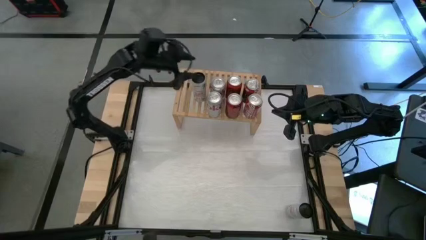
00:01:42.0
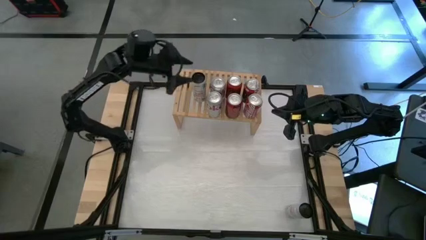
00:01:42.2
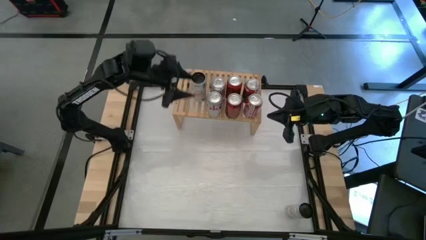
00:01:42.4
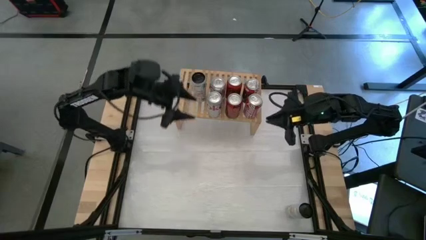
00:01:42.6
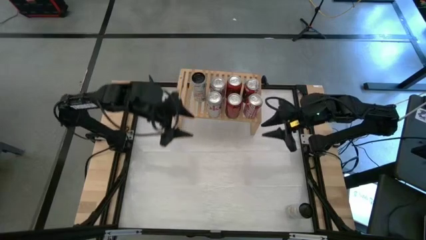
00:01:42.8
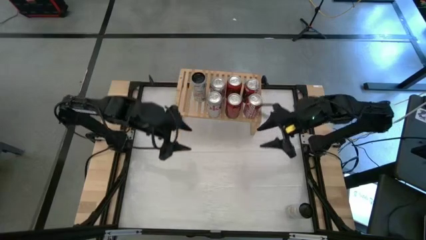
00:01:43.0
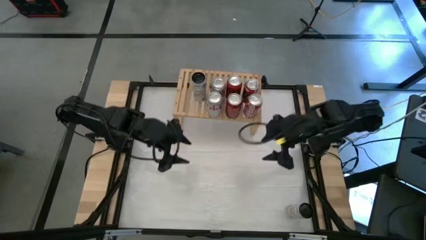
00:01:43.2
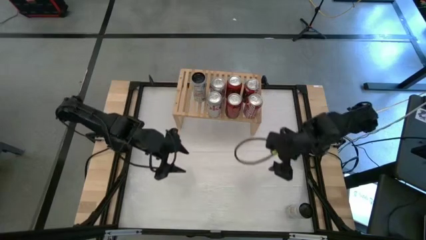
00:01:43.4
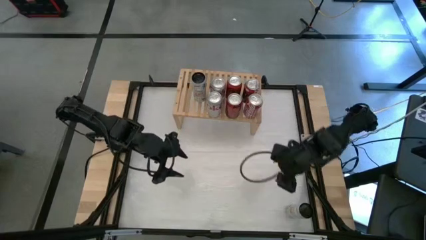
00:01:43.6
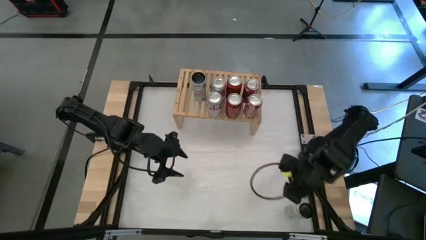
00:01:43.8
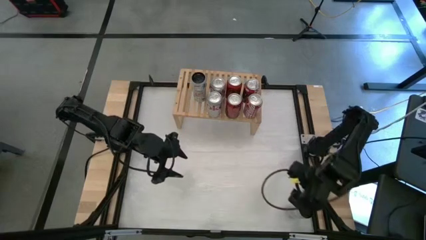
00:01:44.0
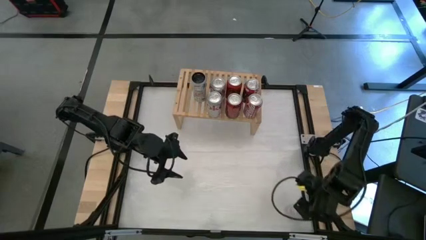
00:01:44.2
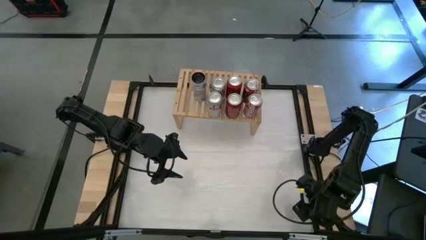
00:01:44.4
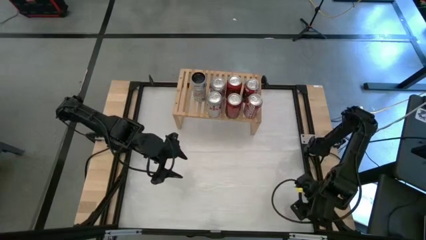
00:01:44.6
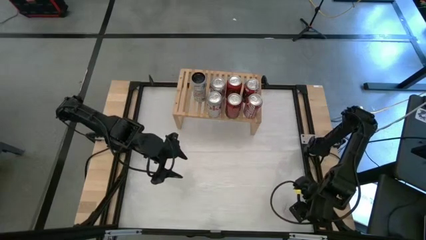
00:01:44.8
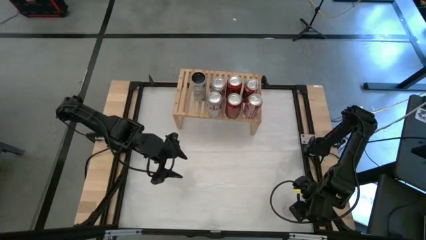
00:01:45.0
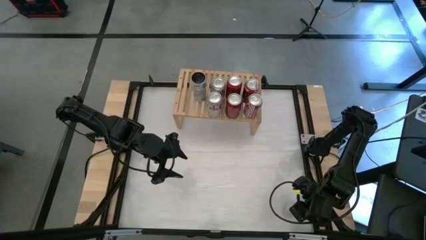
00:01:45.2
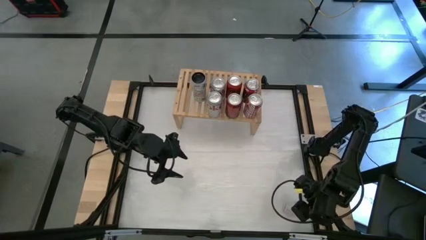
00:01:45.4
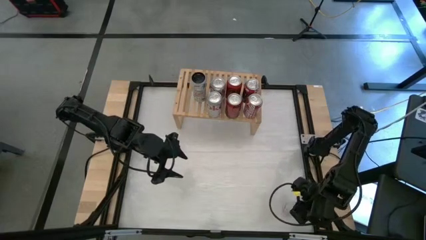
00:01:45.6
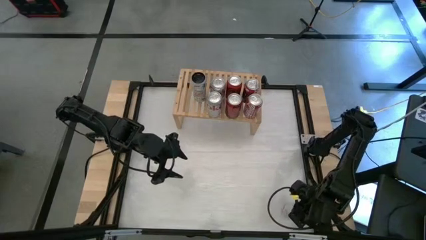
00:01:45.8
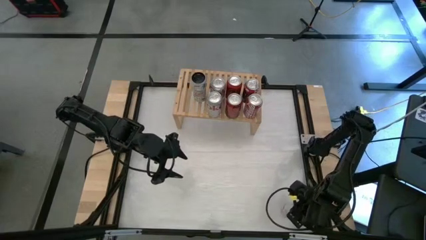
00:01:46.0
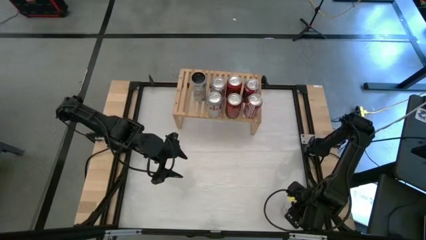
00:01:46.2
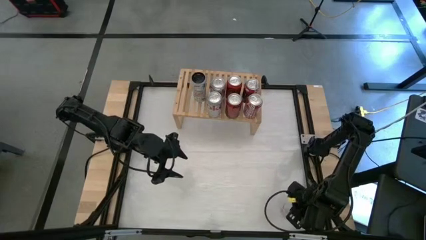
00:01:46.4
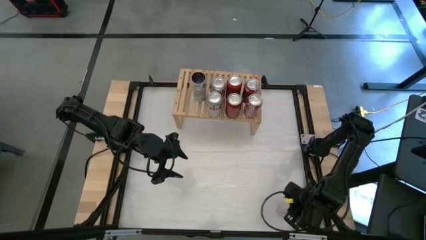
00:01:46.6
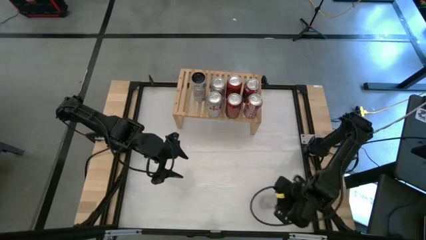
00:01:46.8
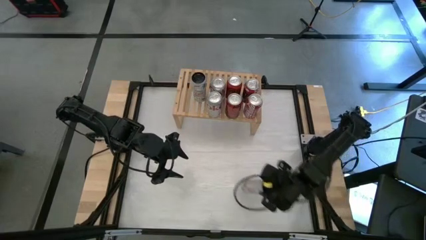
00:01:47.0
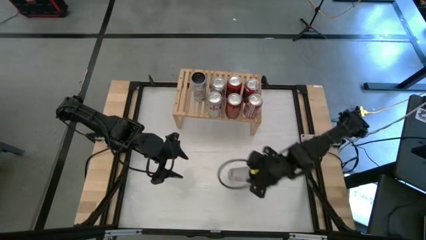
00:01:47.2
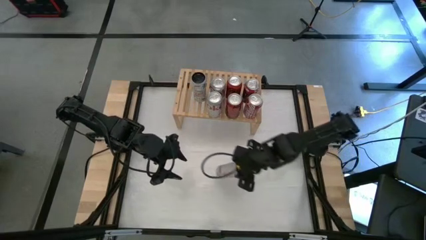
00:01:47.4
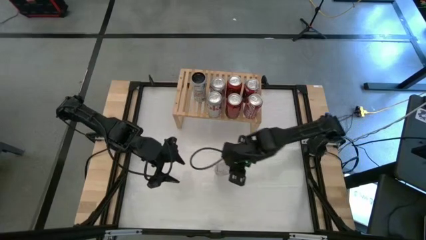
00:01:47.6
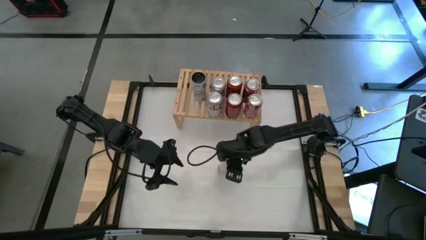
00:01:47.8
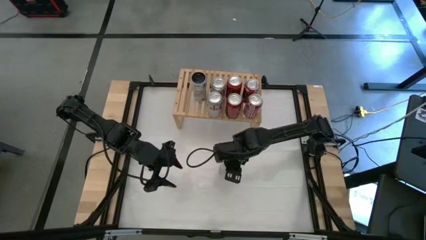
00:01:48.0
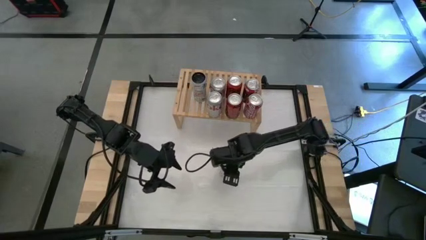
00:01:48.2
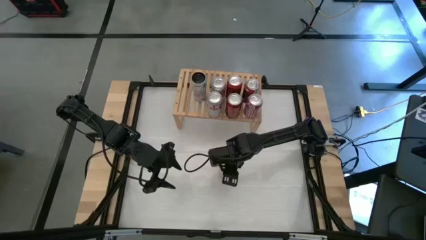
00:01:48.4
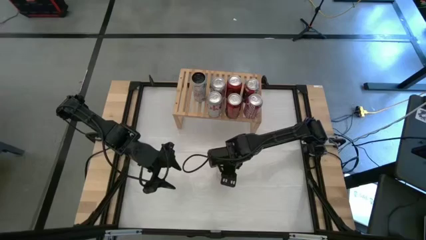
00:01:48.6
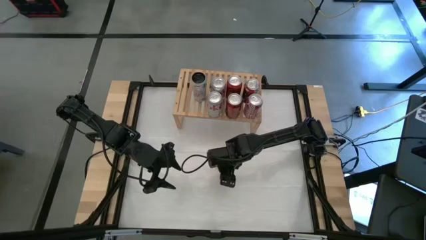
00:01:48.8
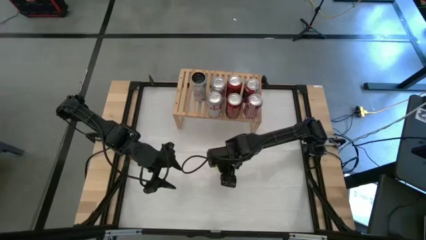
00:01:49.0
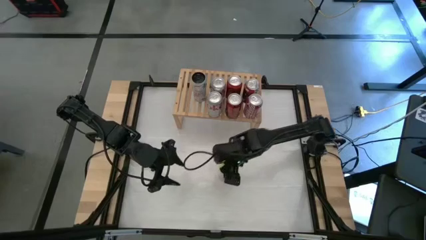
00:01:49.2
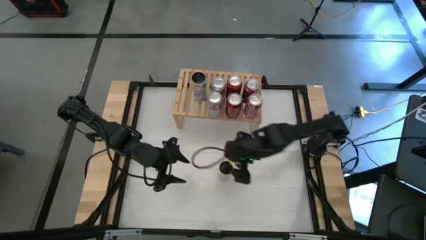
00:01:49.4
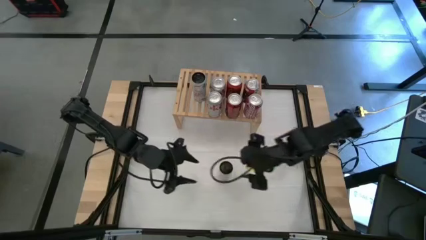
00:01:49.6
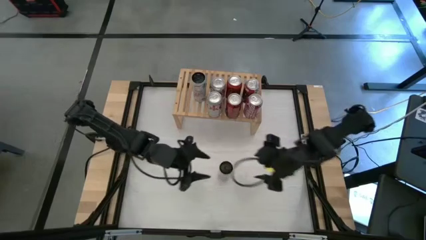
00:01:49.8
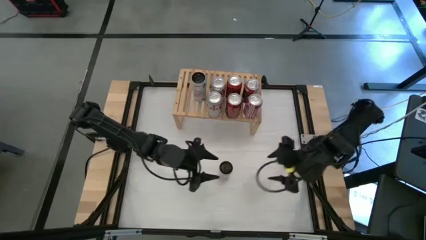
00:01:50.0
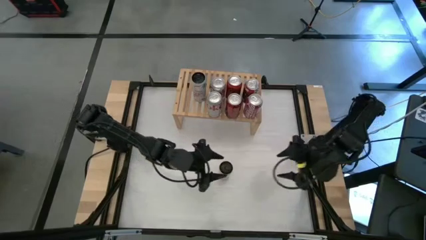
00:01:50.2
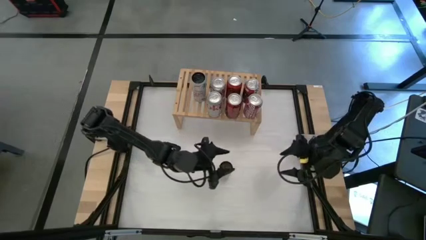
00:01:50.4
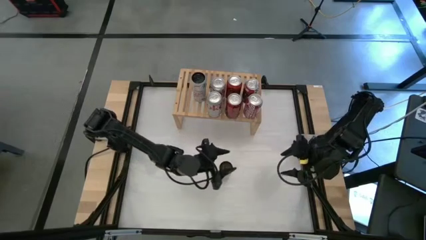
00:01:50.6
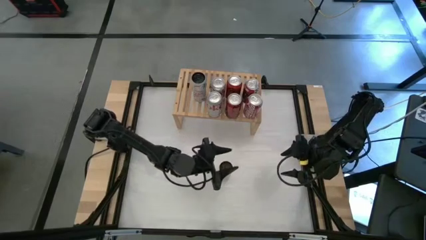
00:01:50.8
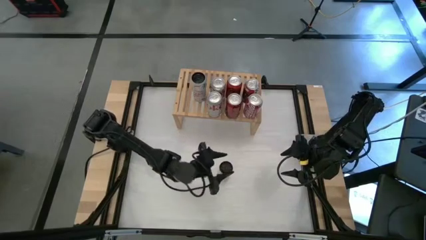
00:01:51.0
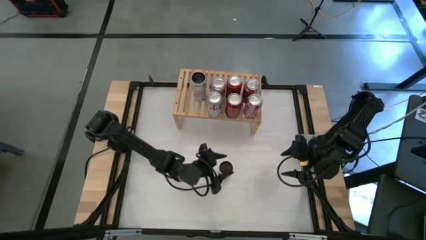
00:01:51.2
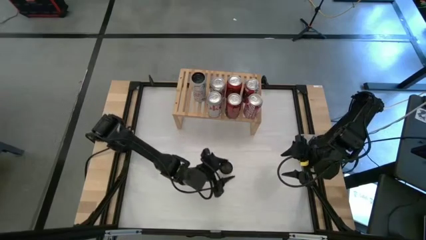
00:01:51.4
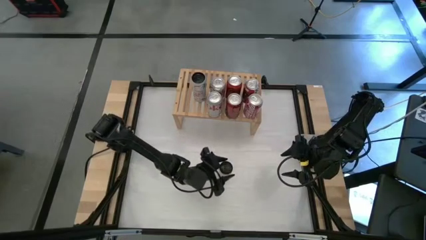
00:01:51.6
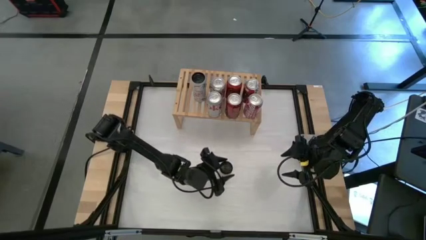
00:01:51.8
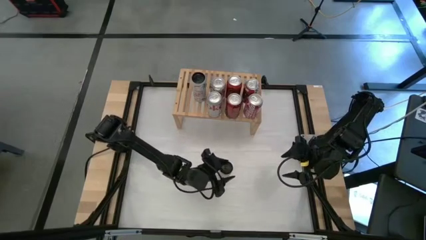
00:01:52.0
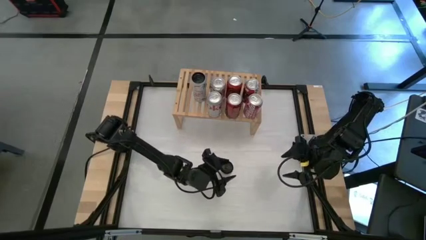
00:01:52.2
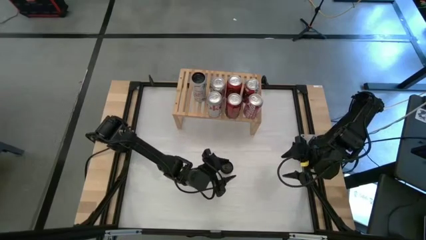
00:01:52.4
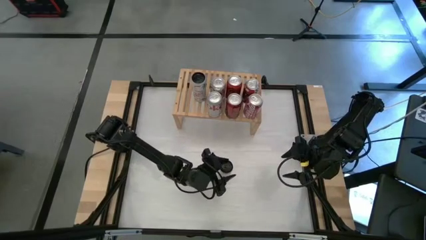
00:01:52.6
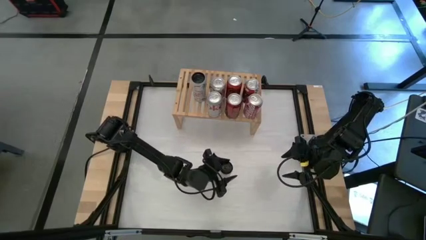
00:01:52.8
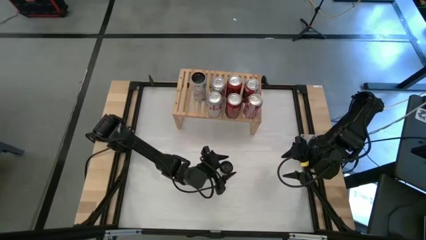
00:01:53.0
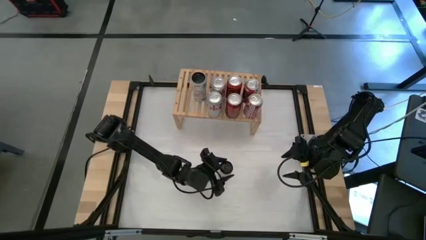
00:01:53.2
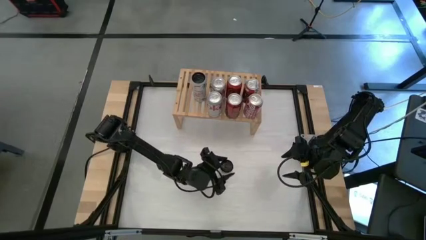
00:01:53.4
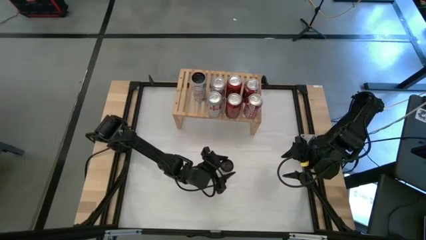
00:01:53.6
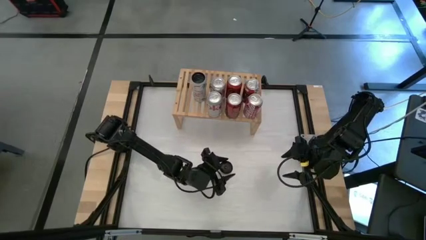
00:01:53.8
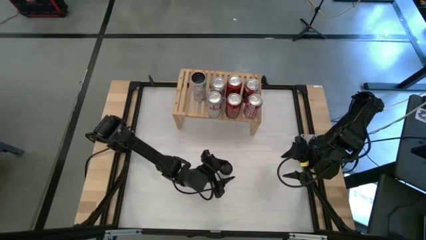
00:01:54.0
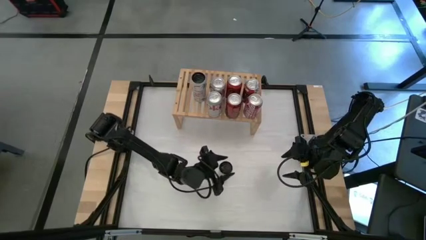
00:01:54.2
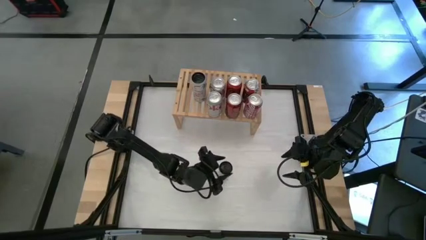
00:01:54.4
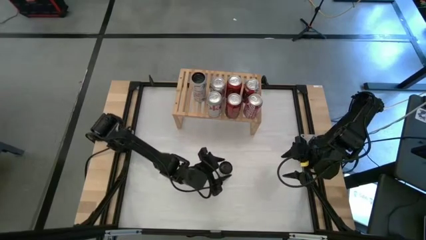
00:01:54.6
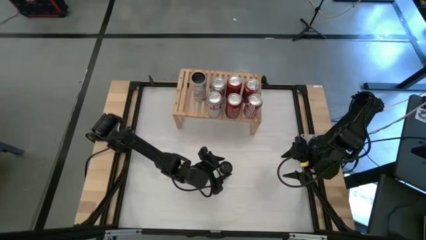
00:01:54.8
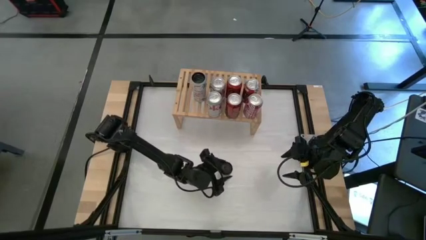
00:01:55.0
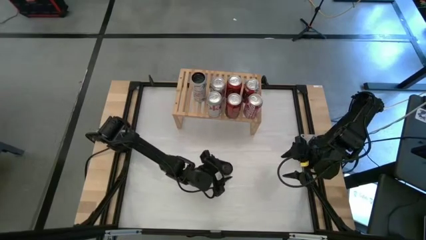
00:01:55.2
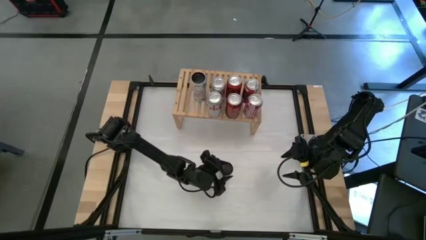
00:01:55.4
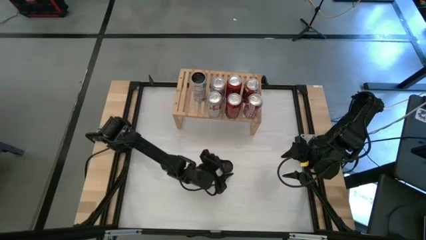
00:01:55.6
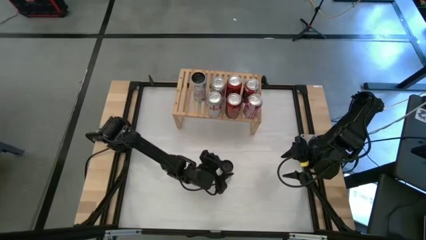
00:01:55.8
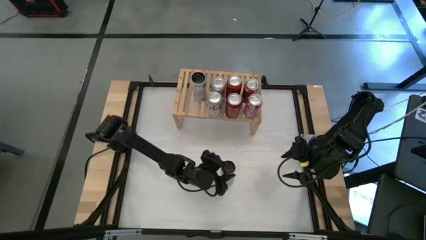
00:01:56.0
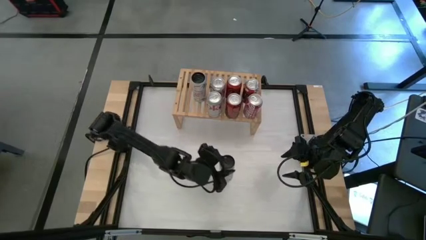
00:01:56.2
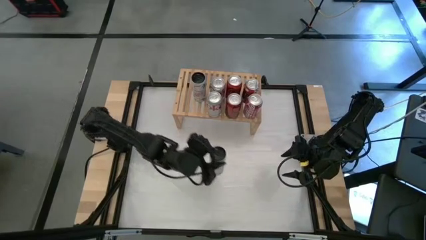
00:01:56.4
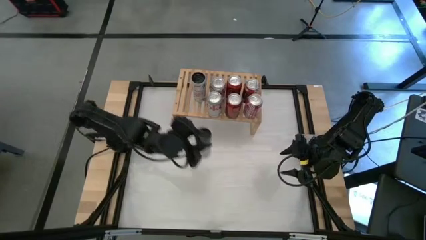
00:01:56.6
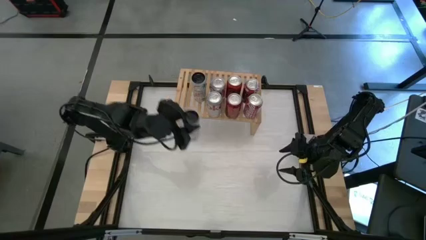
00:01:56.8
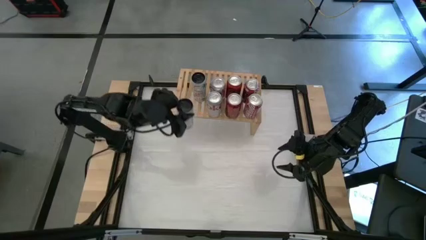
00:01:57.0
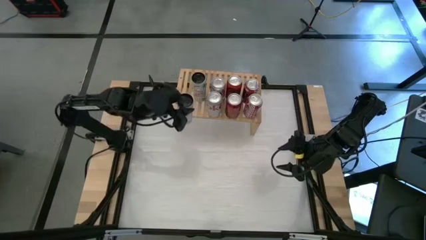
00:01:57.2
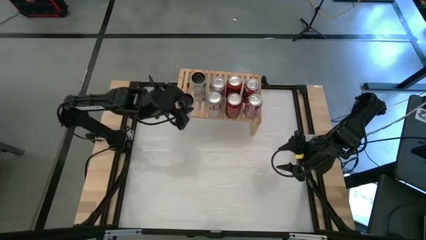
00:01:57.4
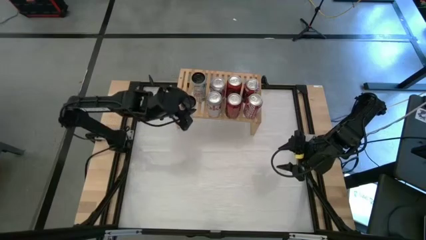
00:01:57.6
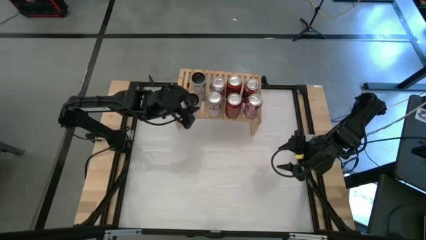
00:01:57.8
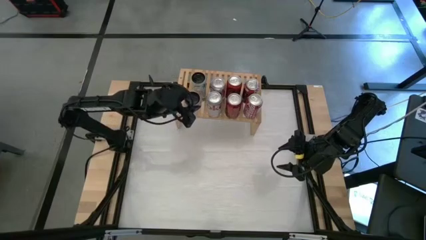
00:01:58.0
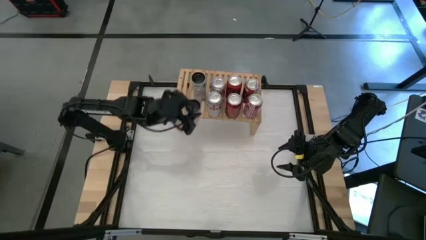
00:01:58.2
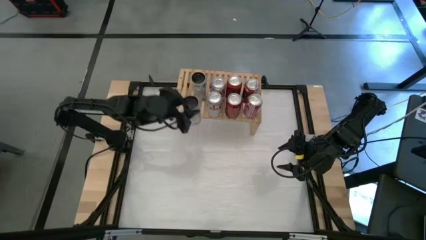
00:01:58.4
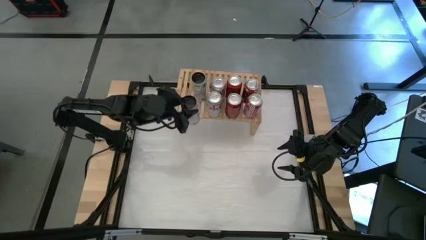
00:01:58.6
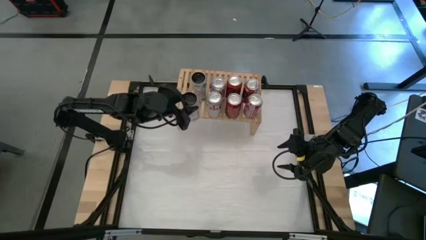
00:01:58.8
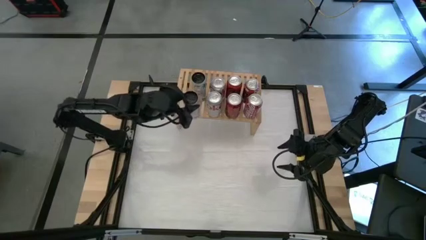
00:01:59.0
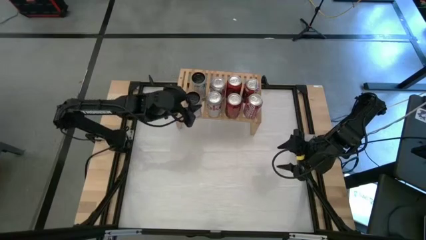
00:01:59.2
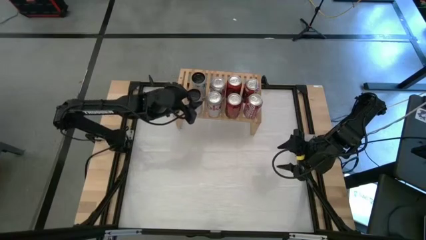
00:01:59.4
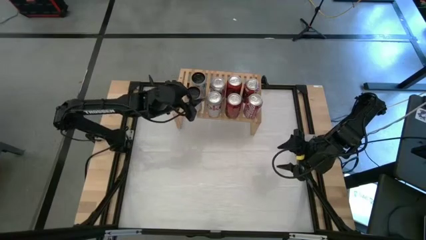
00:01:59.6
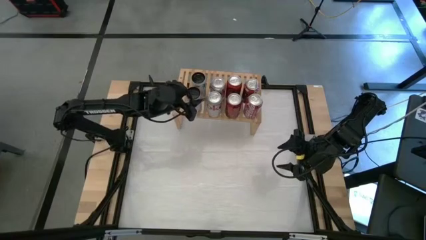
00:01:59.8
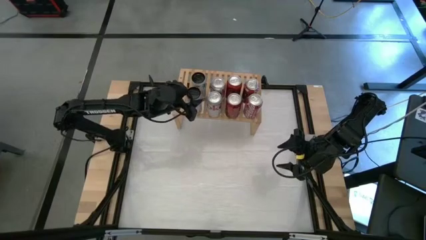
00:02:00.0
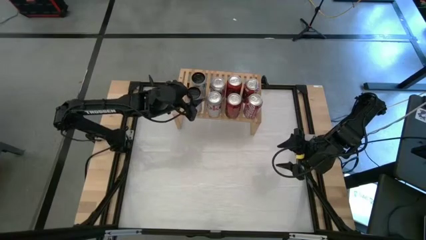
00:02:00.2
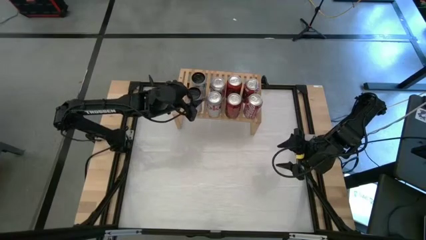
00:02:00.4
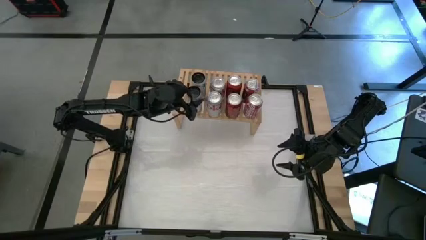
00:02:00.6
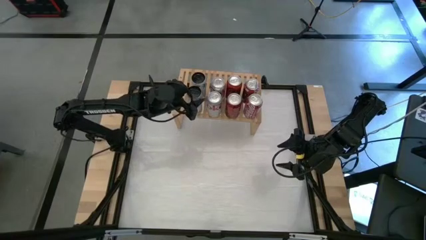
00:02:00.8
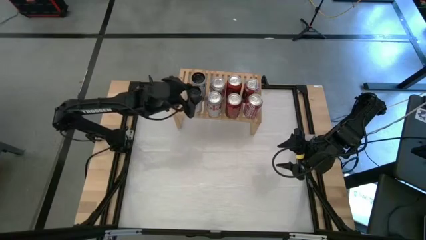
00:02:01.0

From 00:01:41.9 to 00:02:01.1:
Task: Place canned beverage on shelf
Put the white and pink soda can on the shelf aligned with the other white and pink soda can
